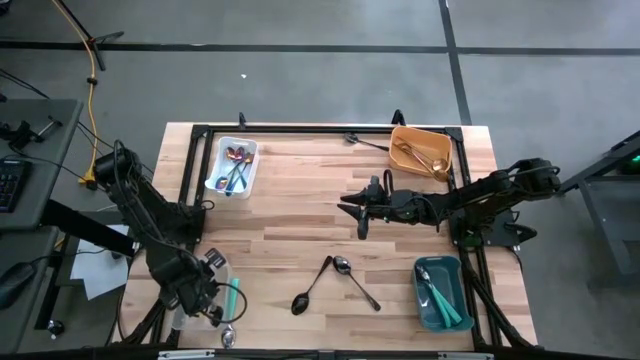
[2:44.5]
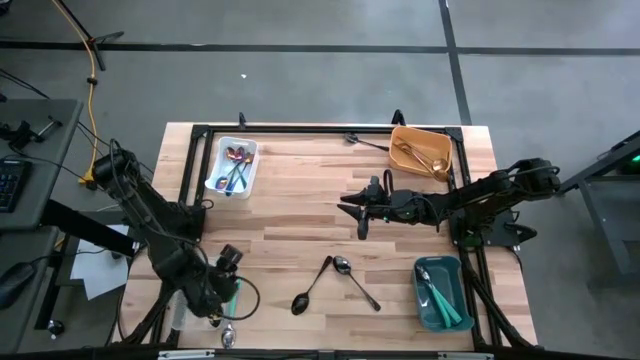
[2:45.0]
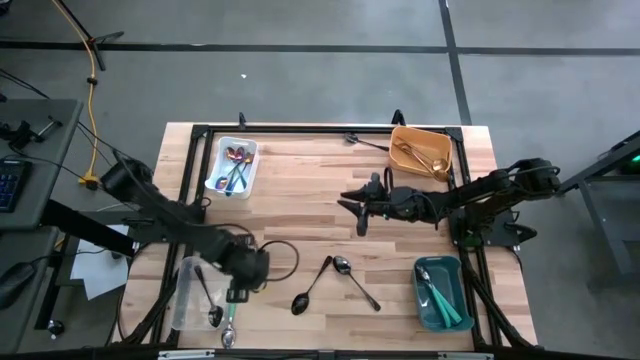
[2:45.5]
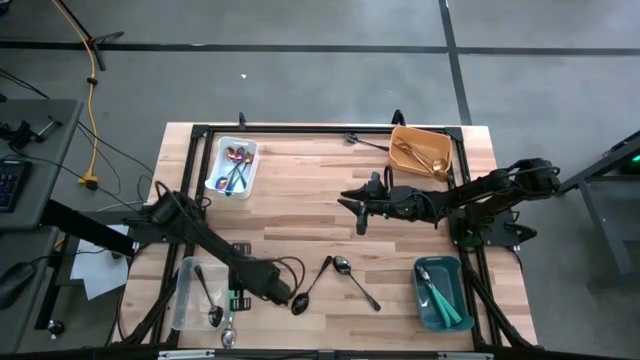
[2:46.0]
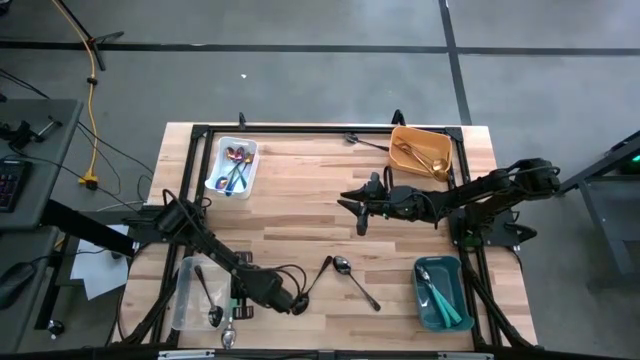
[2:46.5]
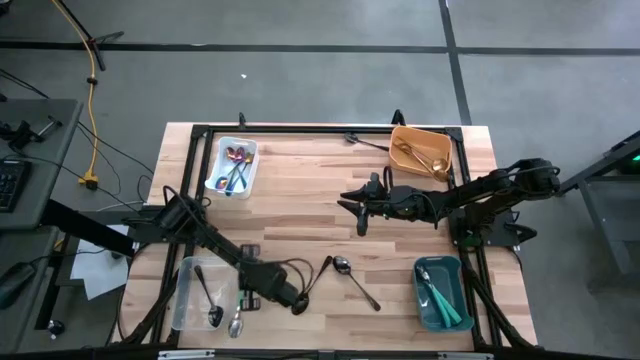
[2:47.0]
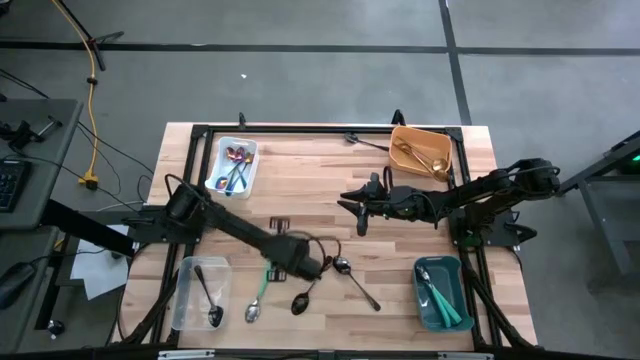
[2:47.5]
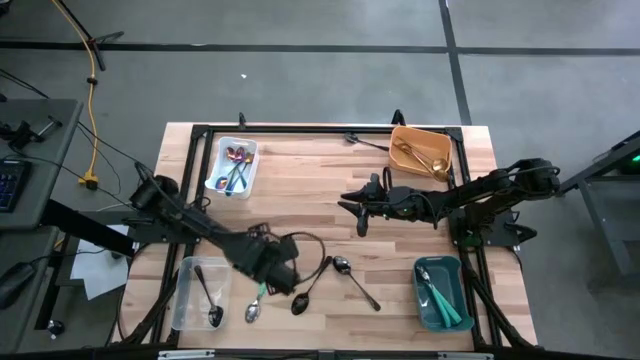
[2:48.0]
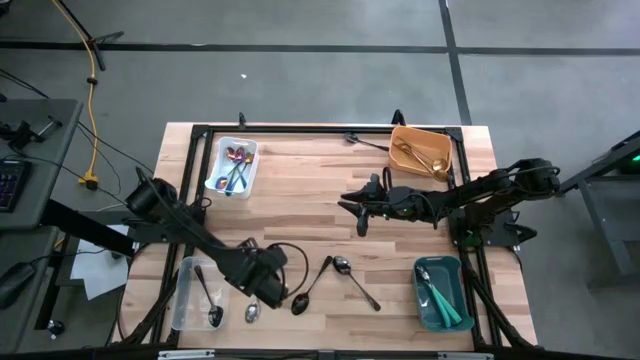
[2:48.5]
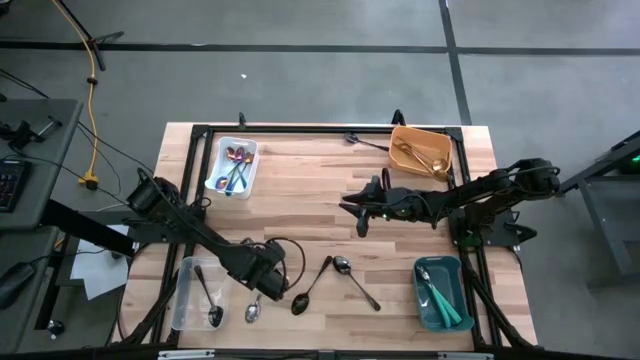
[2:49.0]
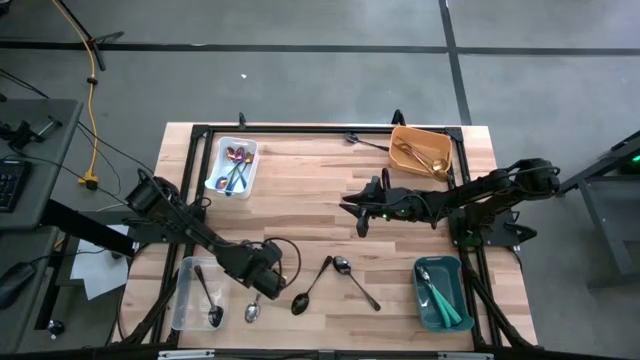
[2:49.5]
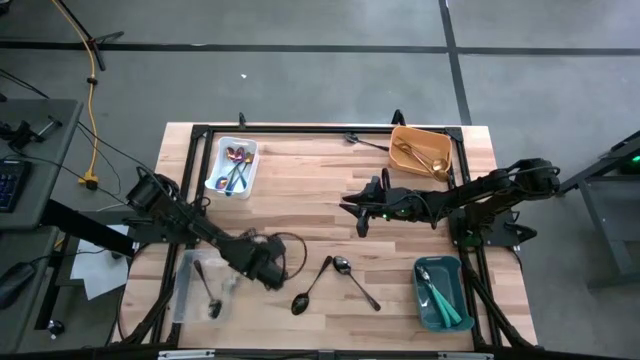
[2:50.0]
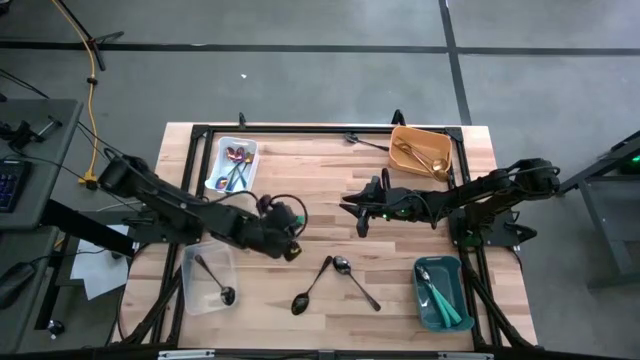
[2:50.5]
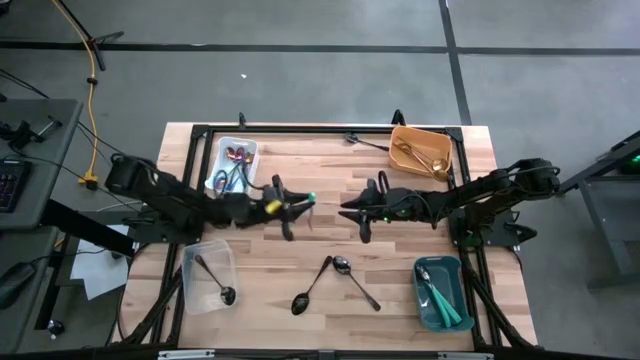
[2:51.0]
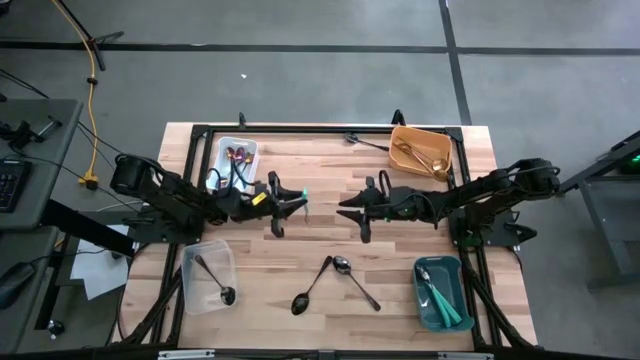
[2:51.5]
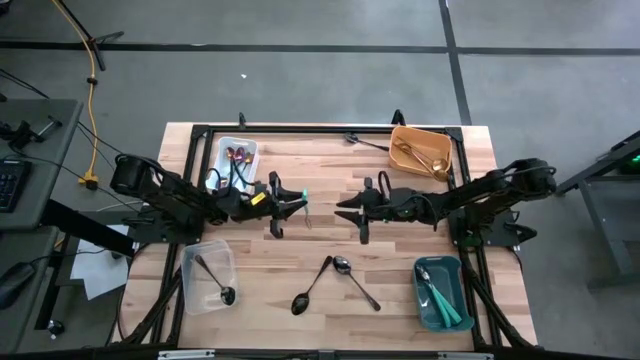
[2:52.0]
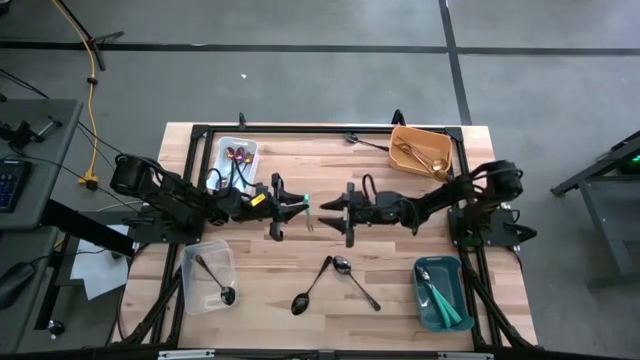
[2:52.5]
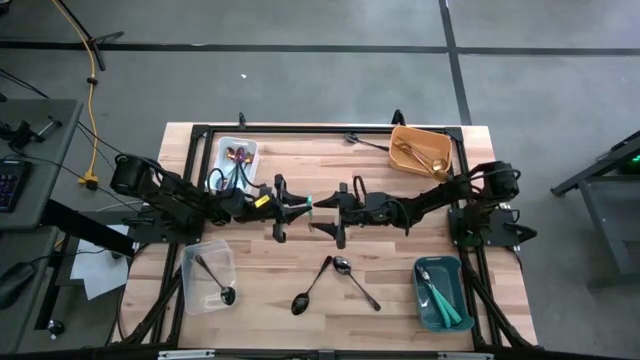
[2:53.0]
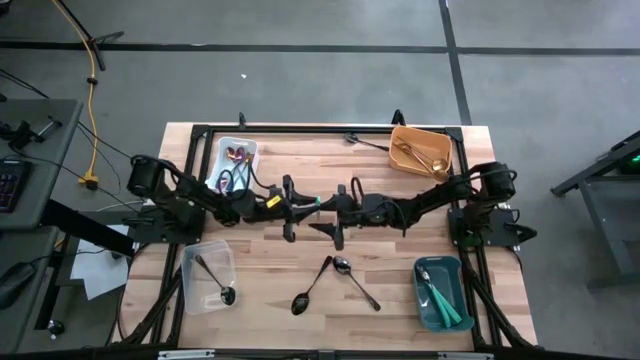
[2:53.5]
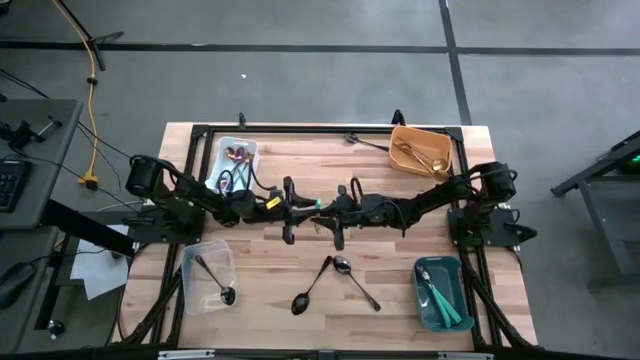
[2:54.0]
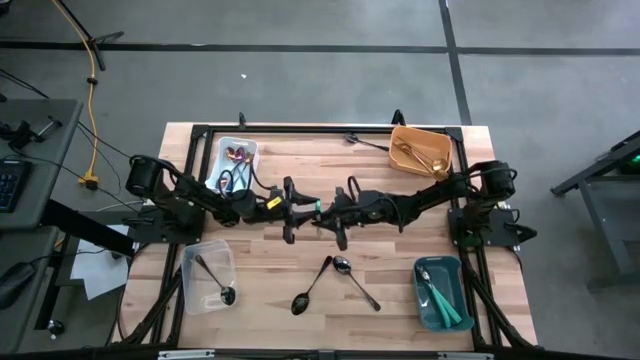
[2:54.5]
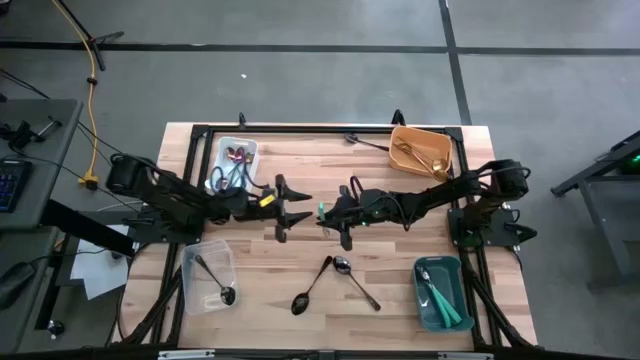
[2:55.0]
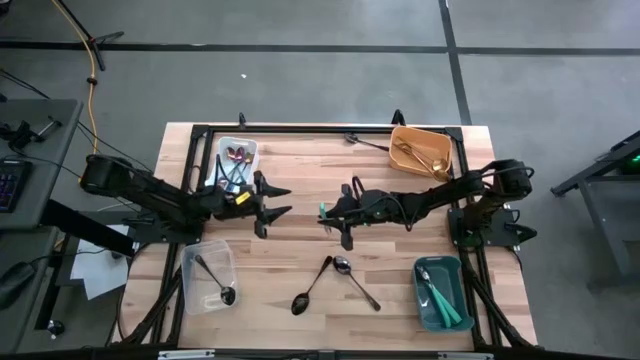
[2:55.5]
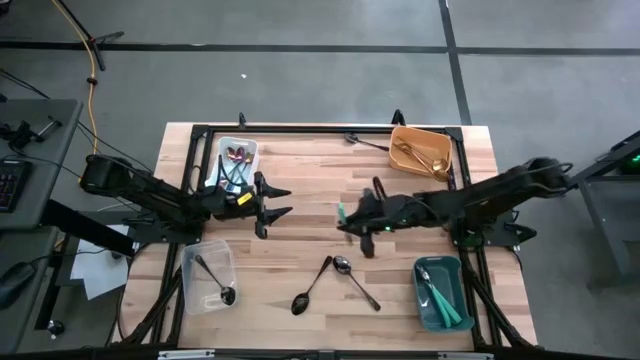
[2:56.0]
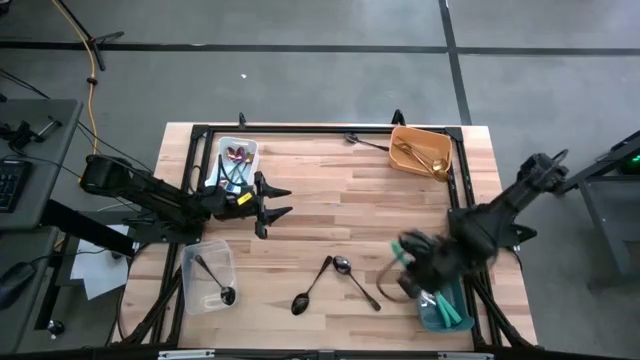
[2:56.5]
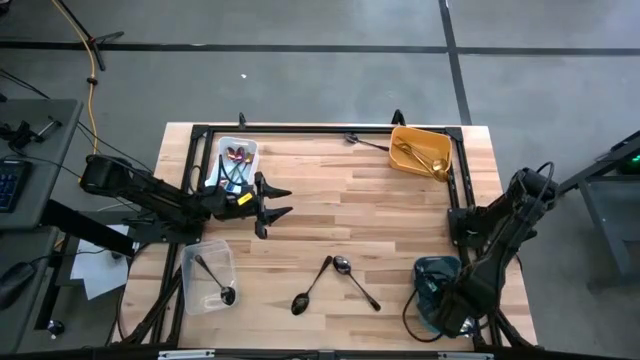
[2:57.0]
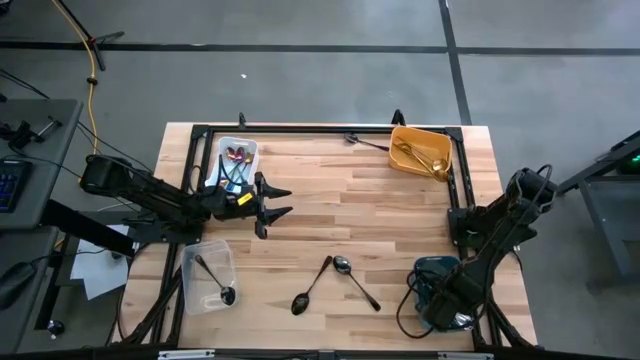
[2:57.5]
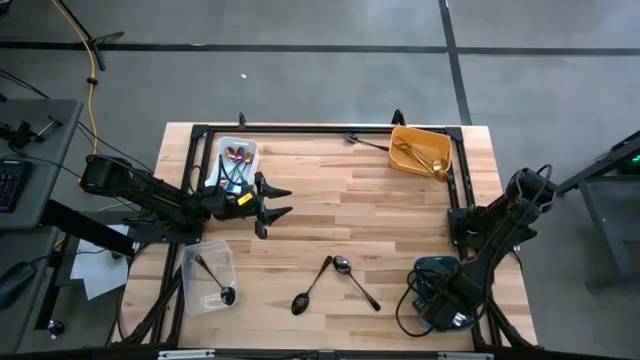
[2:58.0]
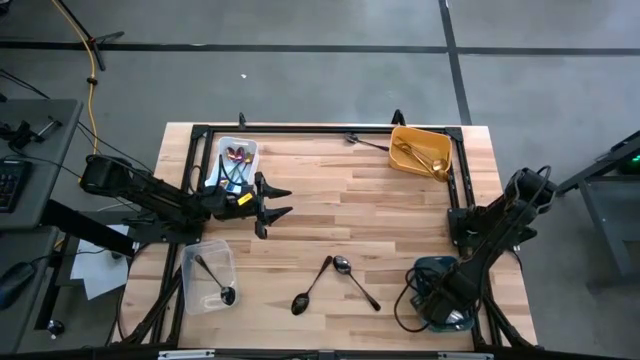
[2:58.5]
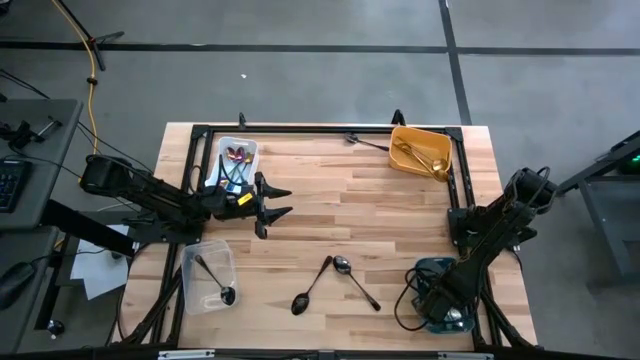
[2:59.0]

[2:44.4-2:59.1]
Task: Sort silverware by color (type)
Put the green spoon into the blue bin

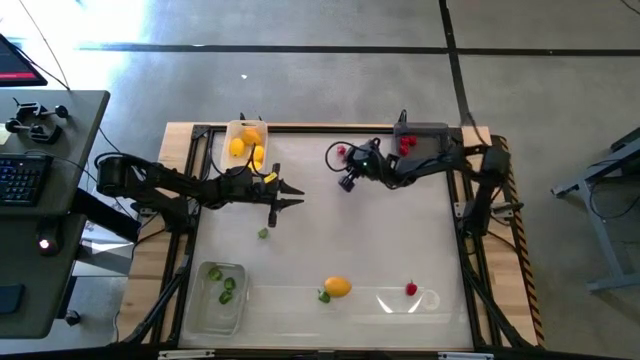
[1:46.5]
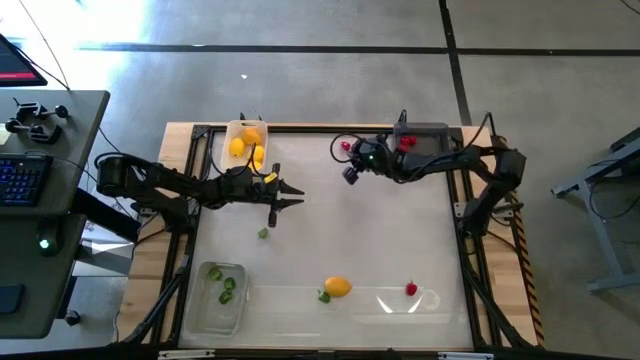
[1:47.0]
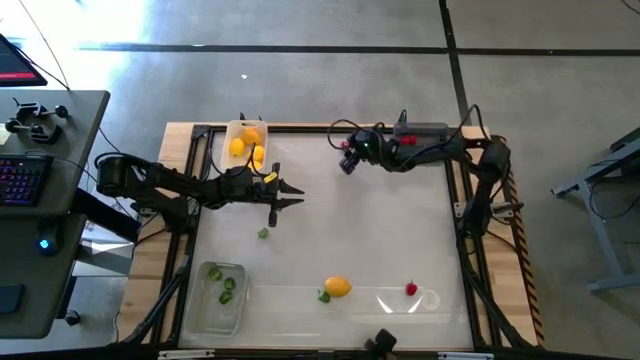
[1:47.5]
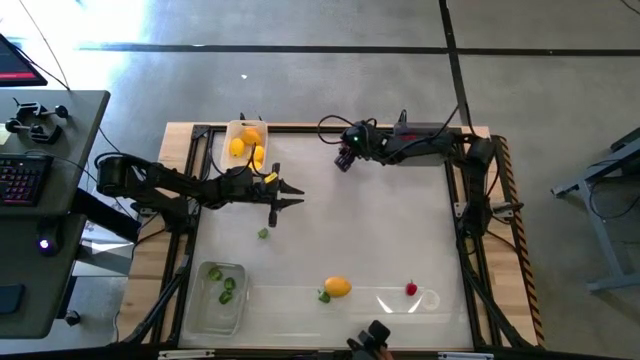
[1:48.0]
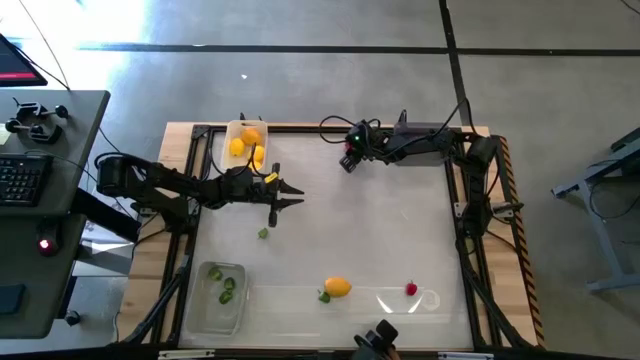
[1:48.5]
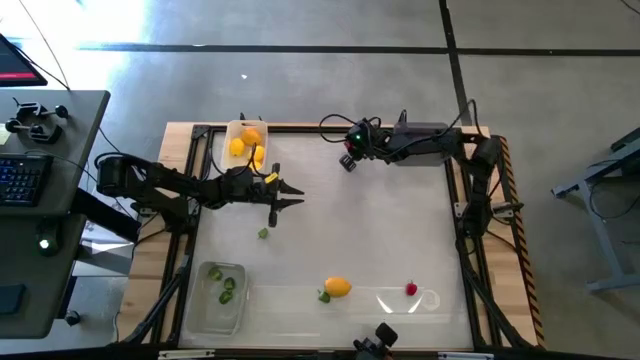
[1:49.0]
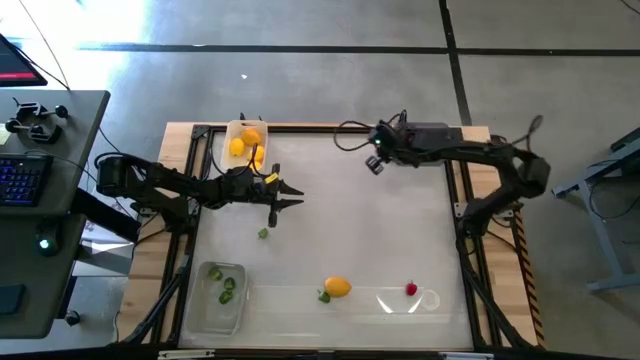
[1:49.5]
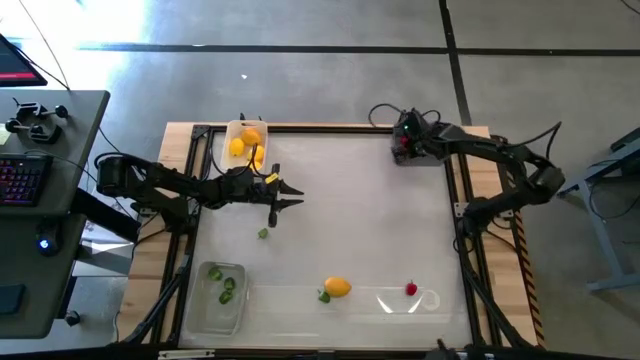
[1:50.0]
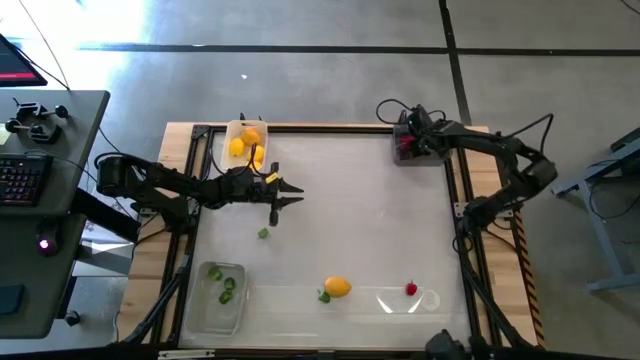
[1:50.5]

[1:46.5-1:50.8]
Task: Sort produce into baskets
Put the red bell pepper into the black bin

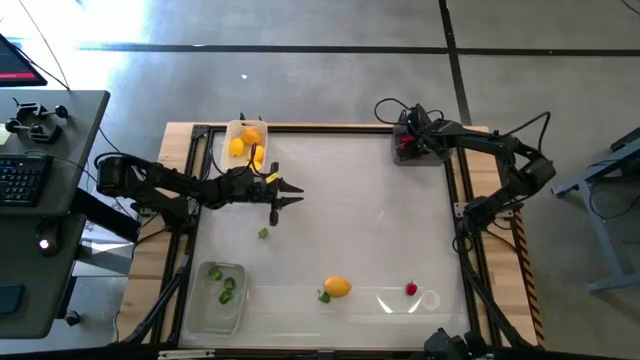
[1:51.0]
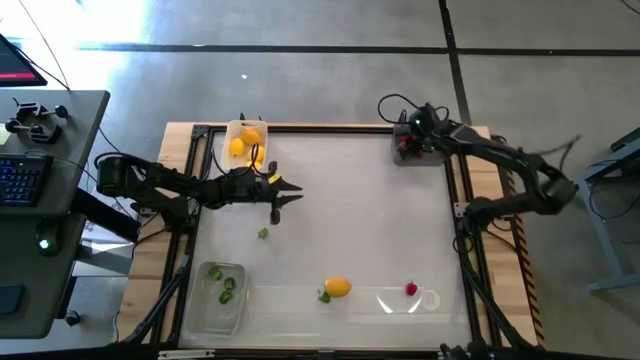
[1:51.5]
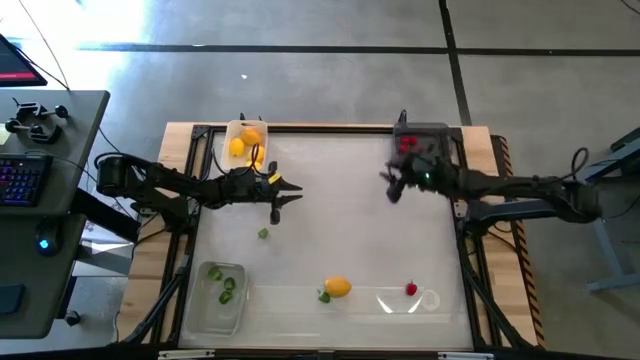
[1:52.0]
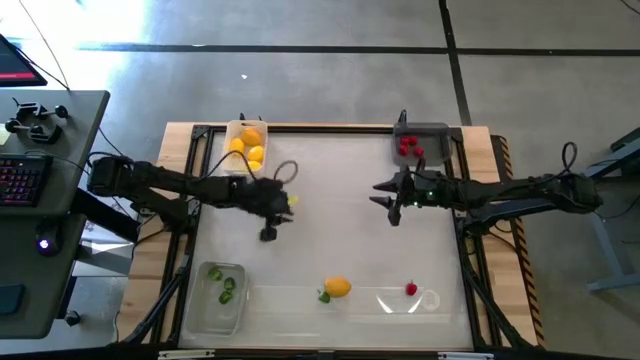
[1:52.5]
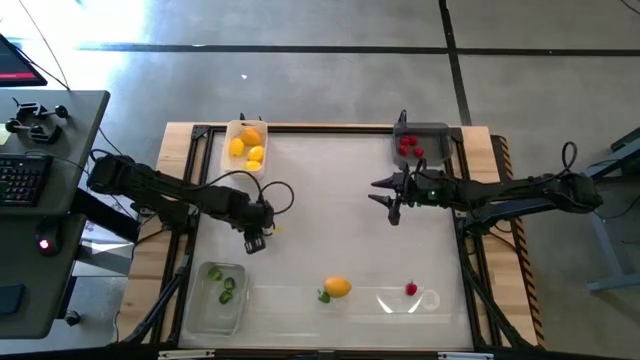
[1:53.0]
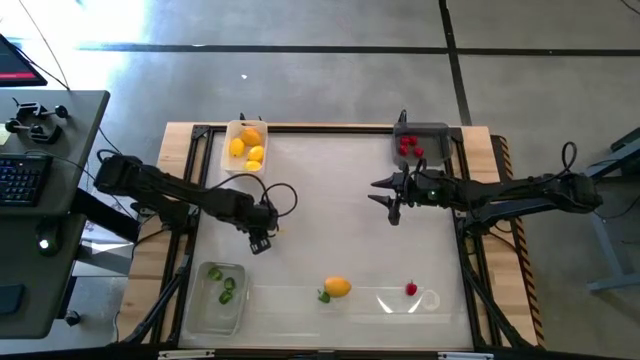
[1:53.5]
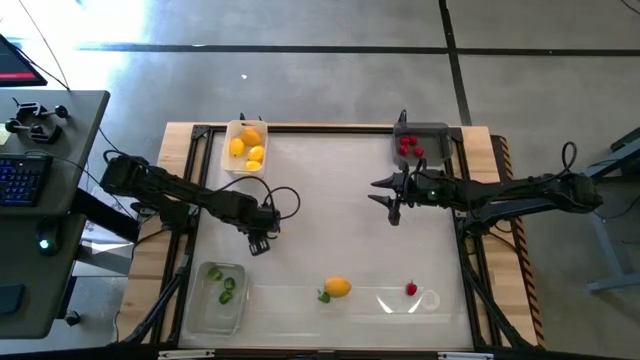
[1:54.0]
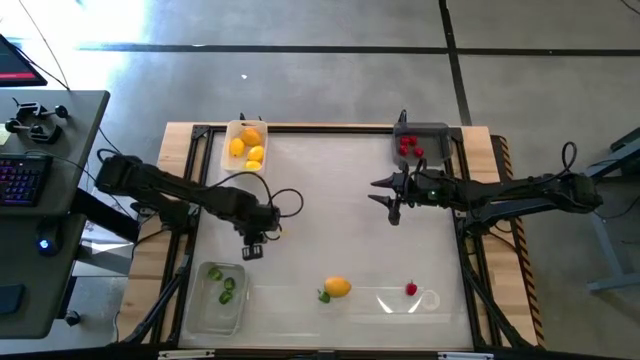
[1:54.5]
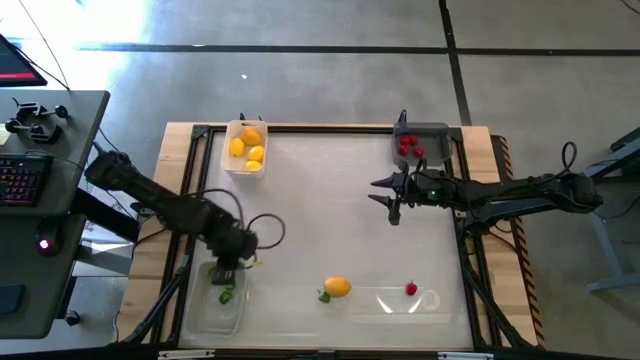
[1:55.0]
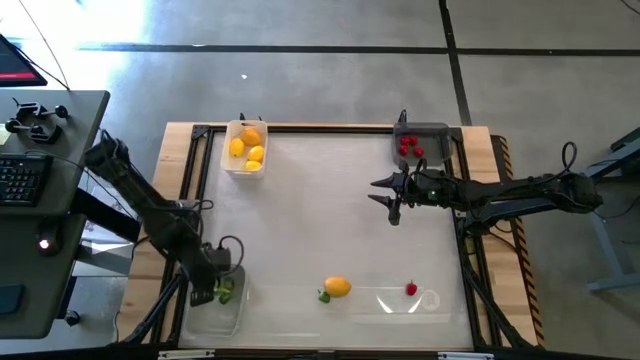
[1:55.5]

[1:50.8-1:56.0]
Put the green bell pepper into the gray bin
